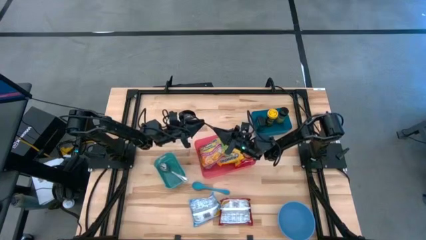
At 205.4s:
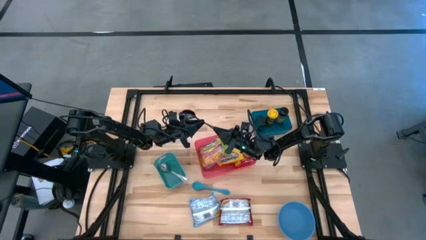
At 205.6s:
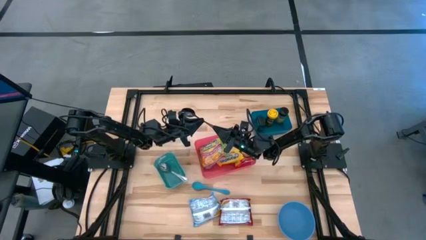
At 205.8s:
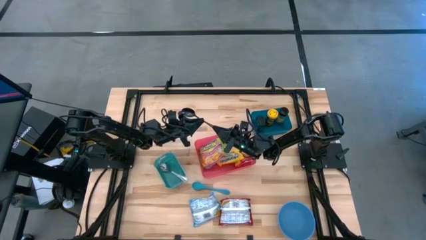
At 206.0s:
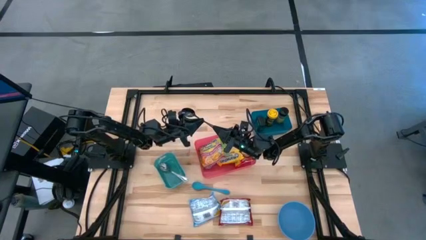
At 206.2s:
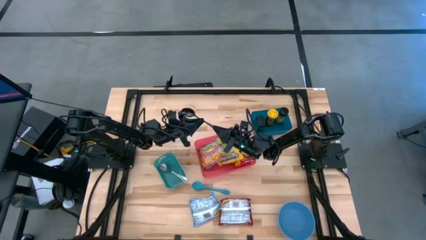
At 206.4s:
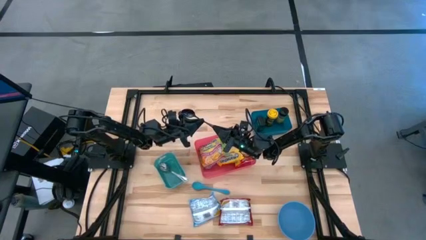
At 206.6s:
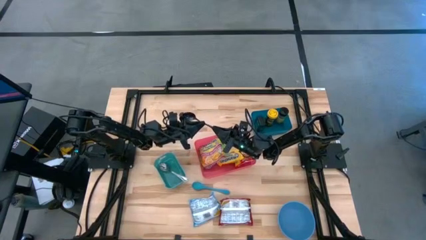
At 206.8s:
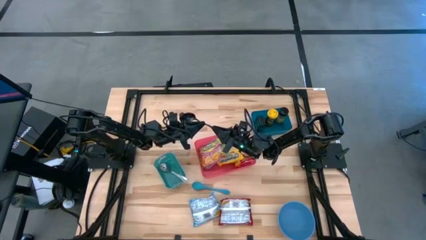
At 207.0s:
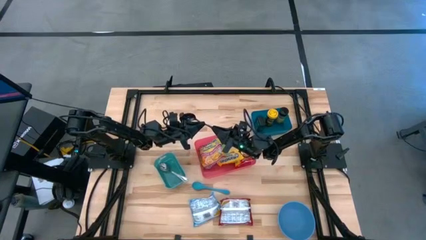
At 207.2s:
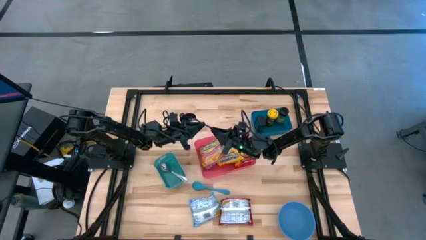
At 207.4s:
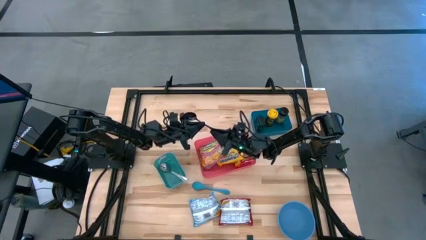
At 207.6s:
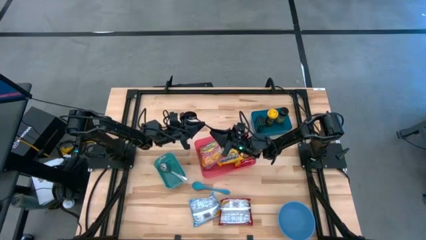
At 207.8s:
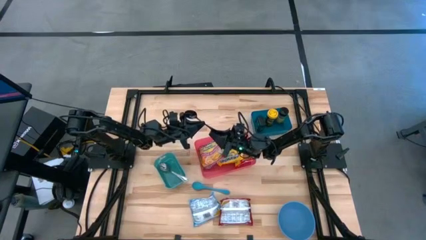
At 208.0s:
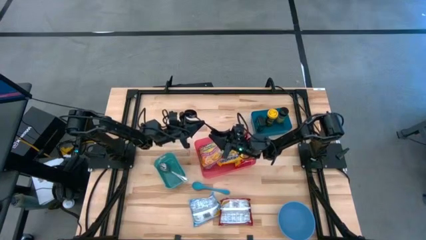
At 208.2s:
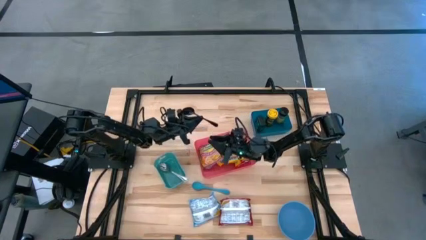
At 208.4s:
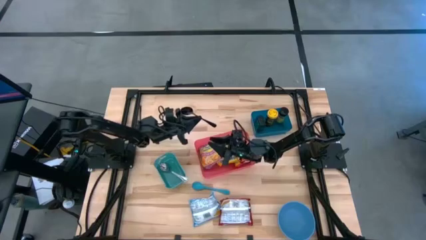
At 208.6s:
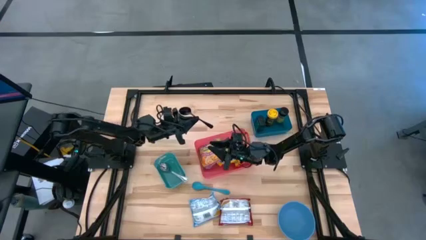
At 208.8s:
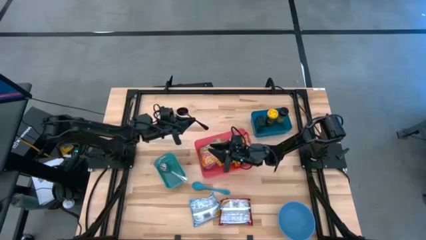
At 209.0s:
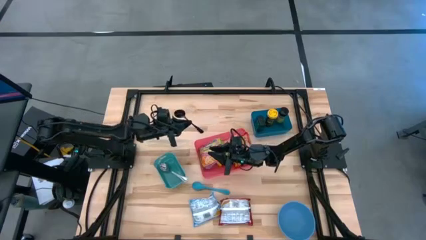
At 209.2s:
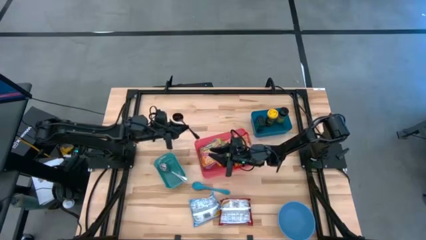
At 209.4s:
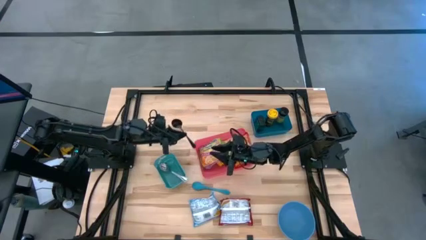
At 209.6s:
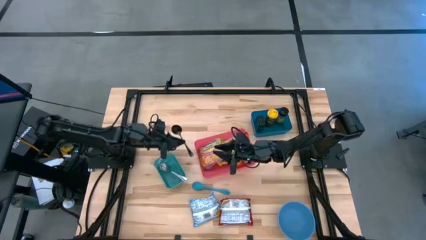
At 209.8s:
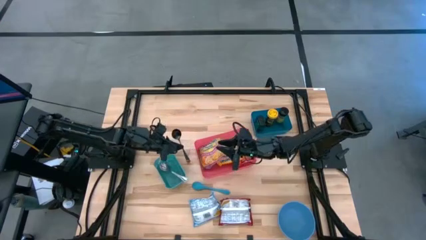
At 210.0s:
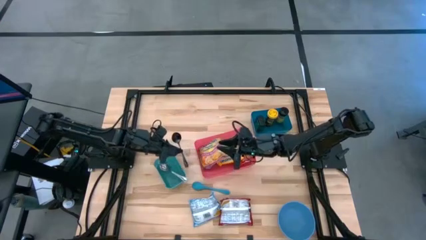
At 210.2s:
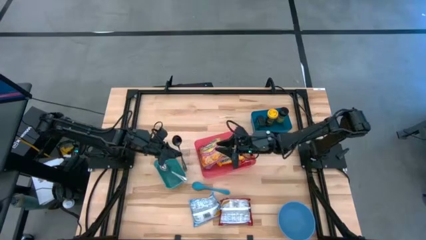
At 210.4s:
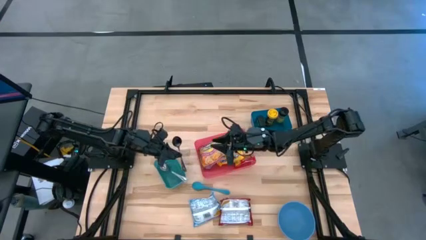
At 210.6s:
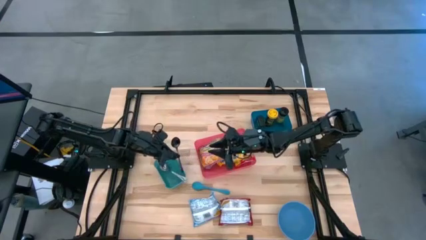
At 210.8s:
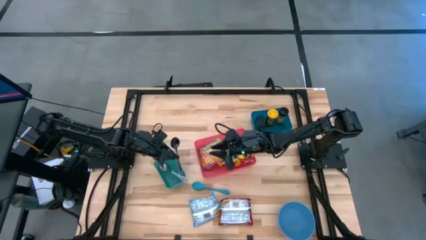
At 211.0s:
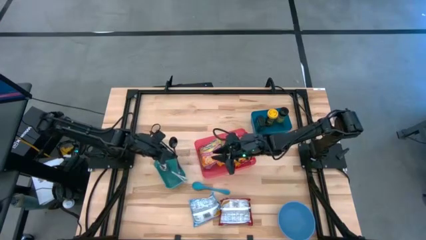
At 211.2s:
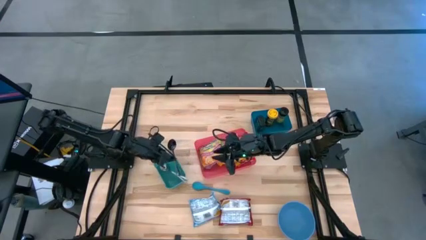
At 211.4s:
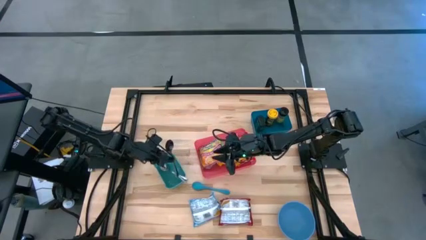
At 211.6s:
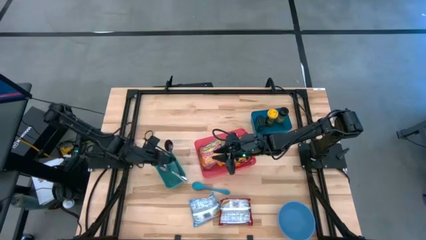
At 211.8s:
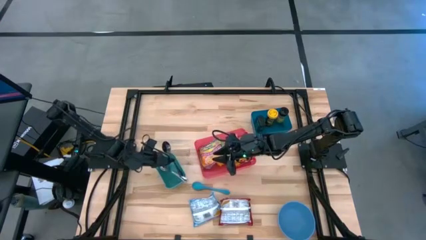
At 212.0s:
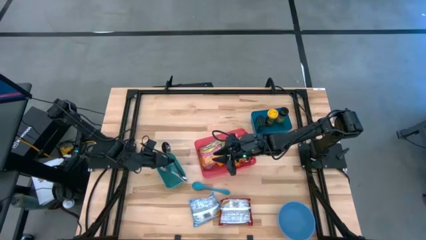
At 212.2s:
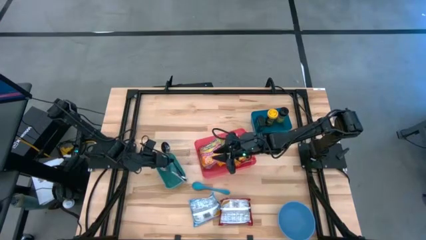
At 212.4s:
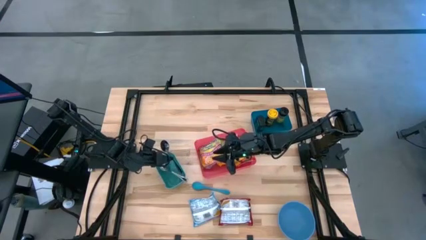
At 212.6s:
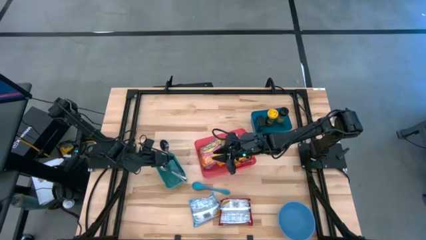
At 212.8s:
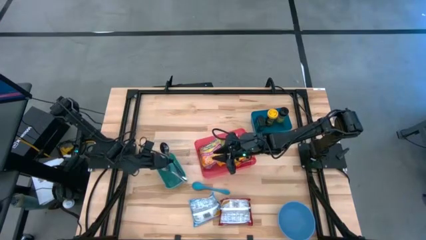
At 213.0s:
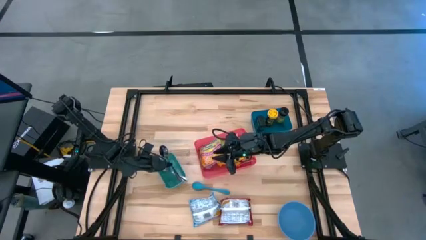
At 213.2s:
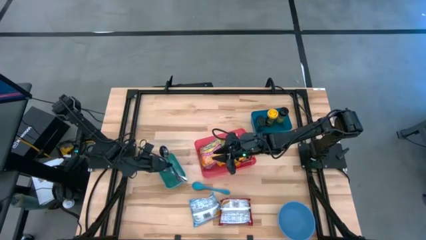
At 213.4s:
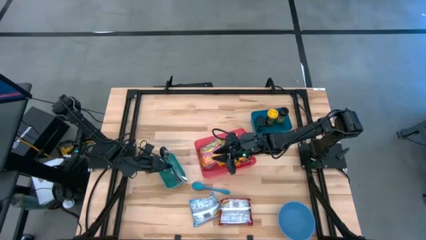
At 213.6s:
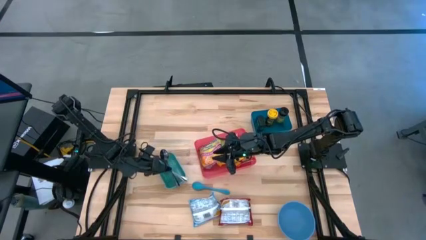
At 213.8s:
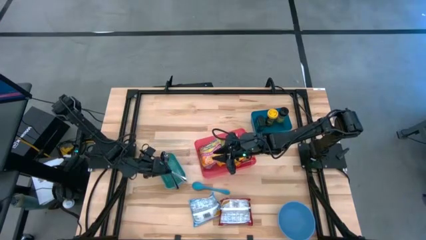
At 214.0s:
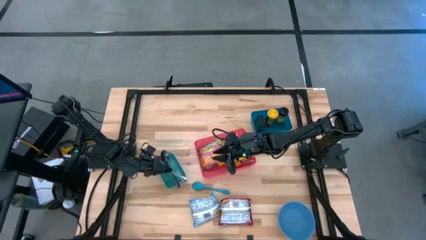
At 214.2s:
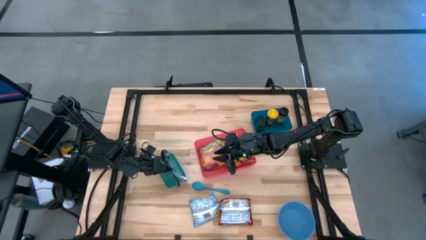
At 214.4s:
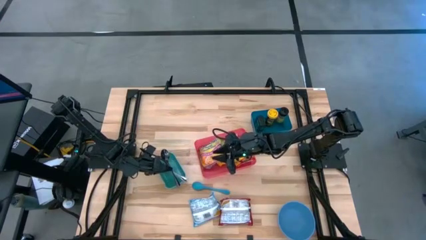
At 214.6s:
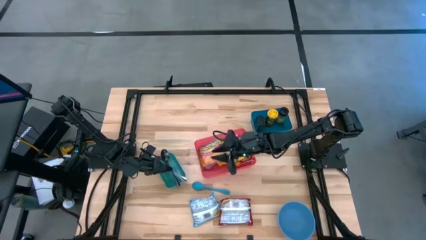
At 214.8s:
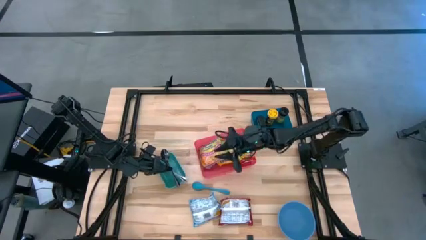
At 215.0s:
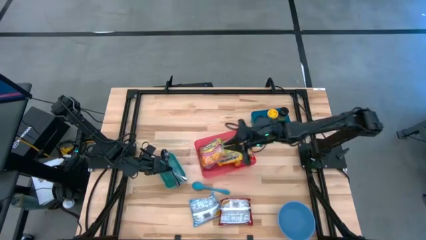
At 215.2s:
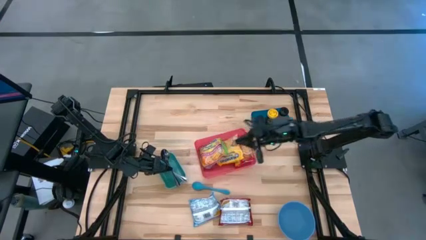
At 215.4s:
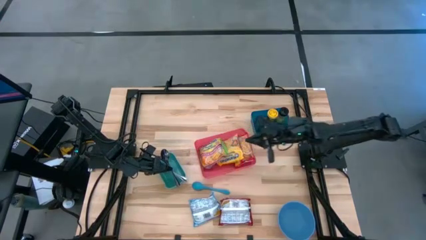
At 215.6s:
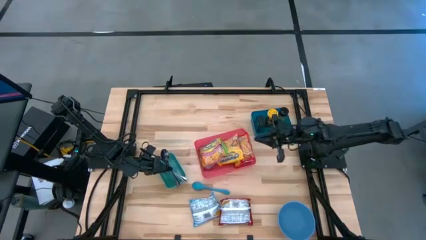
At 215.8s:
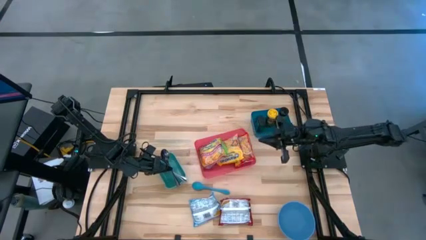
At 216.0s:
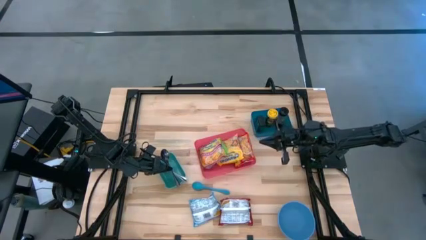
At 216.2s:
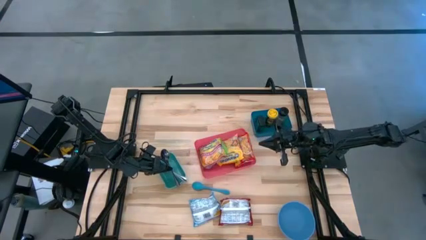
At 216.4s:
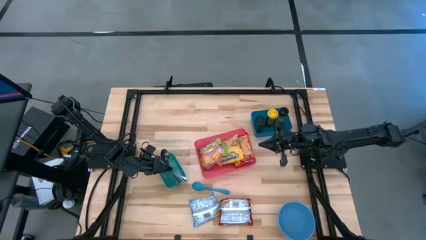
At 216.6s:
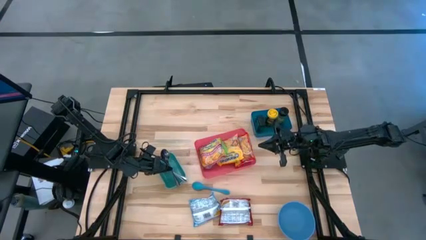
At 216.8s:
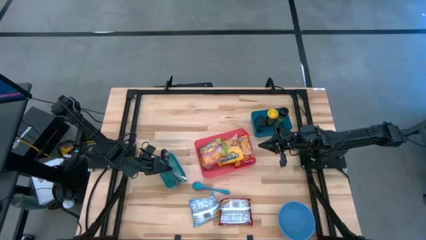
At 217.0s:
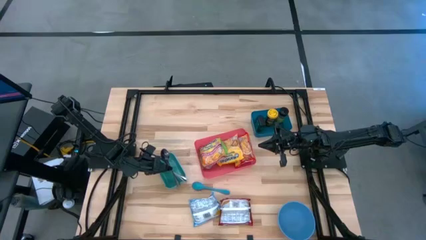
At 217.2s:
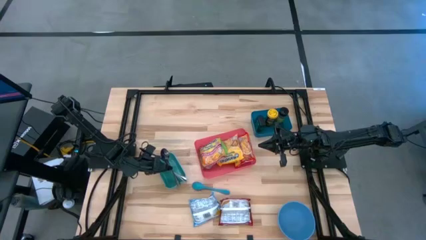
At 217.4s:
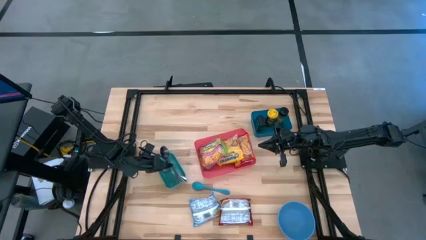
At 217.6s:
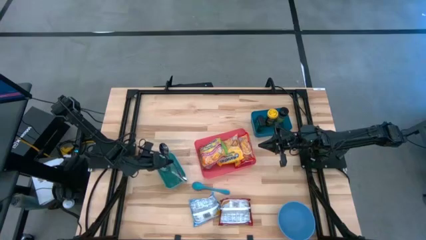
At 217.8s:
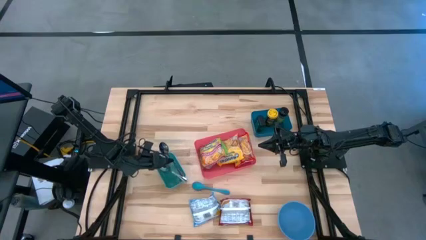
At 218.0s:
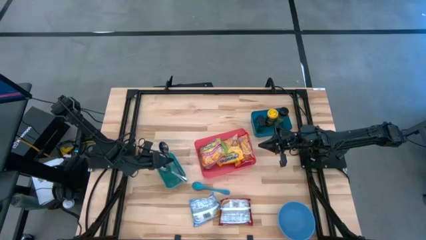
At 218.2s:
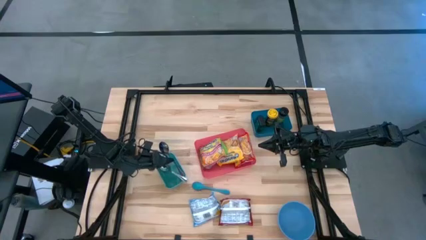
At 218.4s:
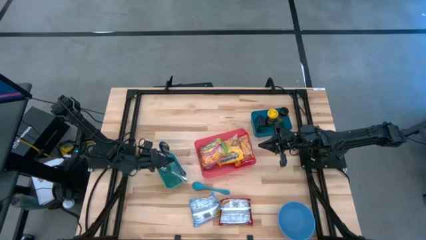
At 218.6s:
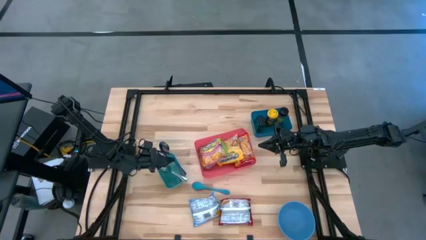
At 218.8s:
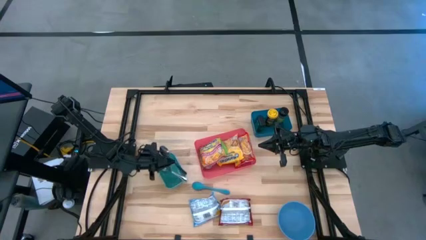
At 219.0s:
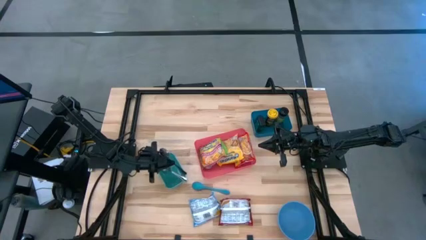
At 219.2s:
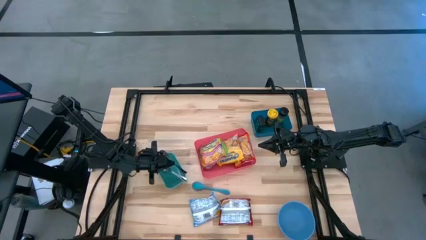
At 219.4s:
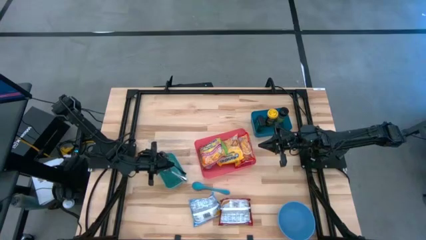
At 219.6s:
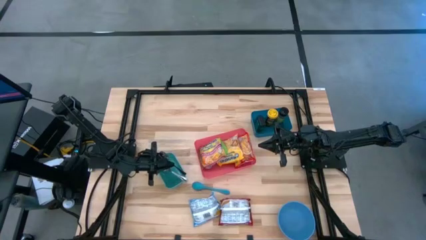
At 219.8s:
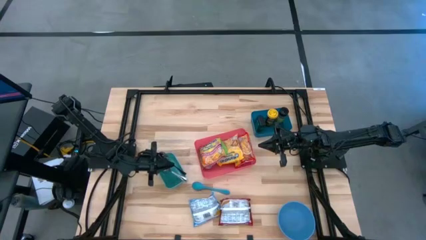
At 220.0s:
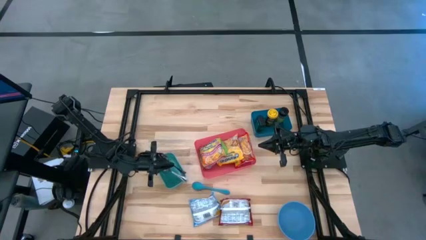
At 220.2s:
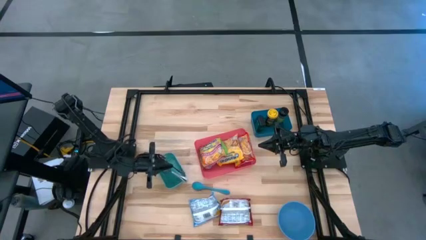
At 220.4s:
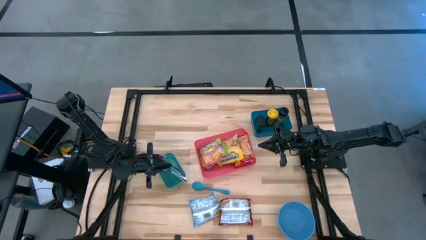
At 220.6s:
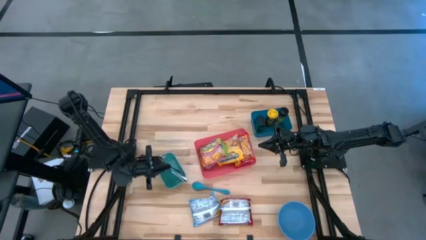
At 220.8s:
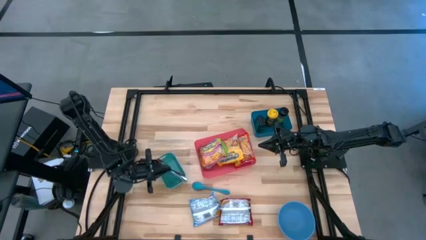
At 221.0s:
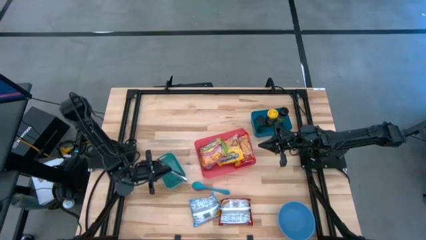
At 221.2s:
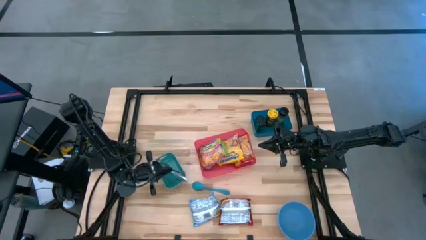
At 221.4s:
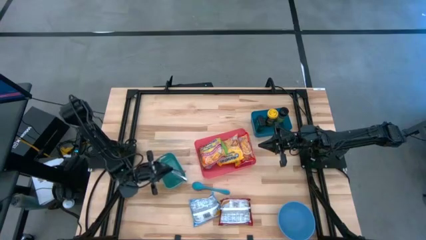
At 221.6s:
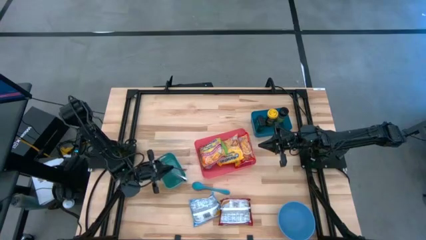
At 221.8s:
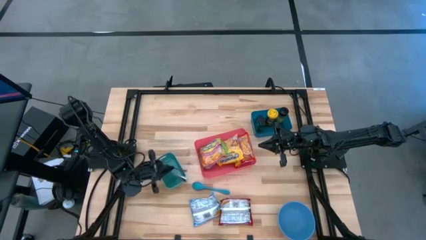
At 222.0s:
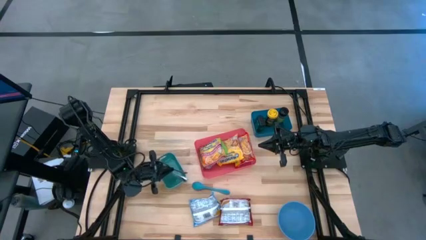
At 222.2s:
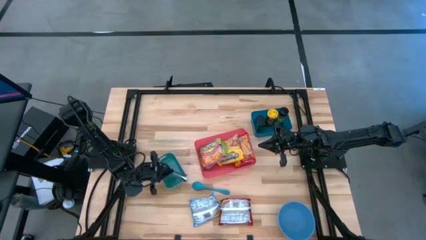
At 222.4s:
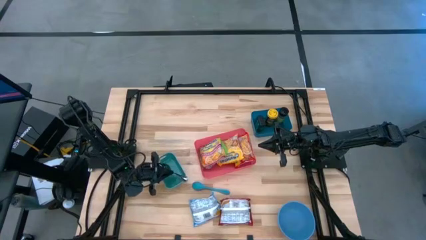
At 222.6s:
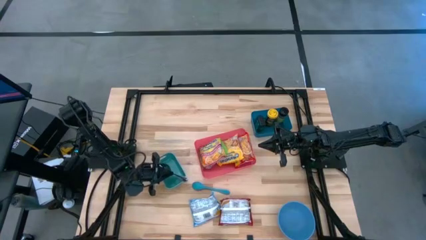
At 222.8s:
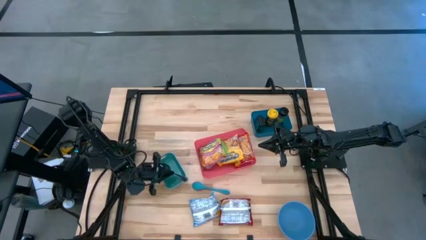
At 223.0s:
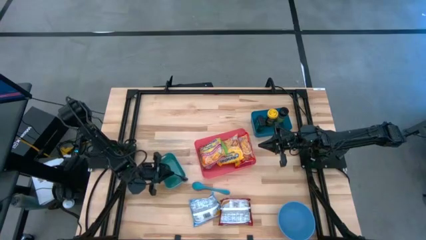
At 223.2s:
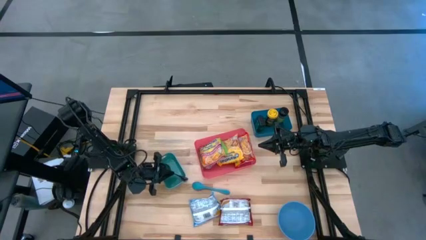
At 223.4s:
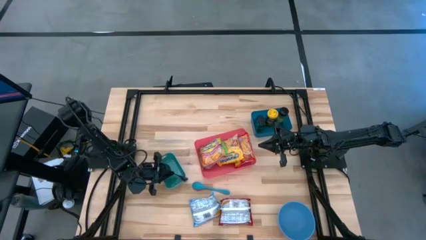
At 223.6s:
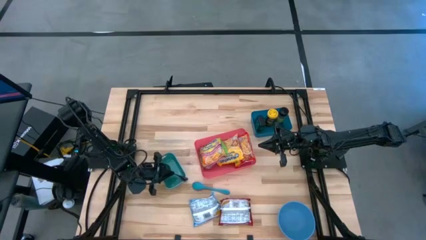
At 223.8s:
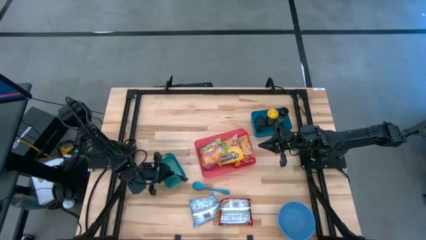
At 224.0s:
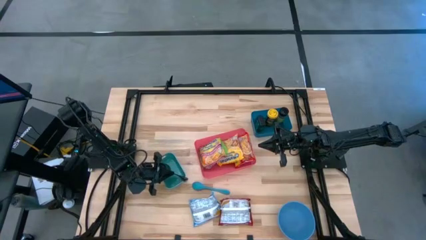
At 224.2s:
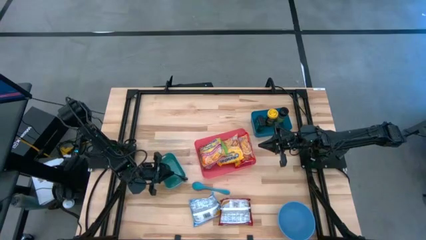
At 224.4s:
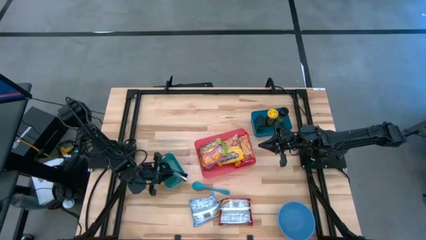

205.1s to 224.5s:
Task: Pick & Place Food Item
Put the black spoon into the green bin
